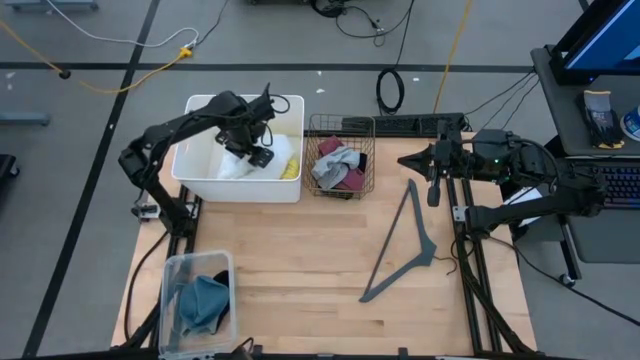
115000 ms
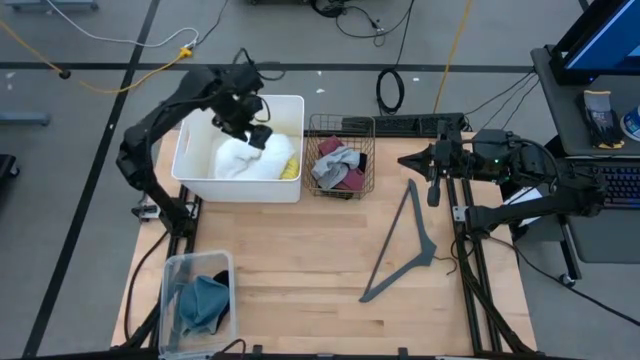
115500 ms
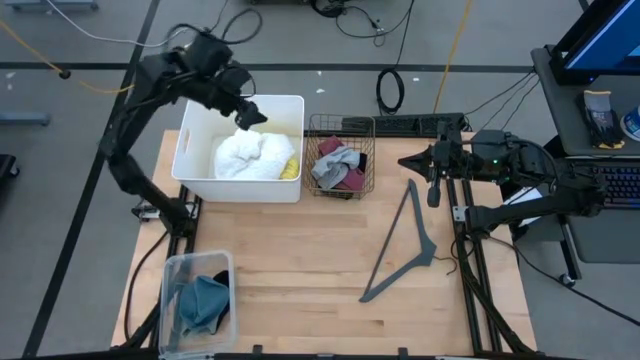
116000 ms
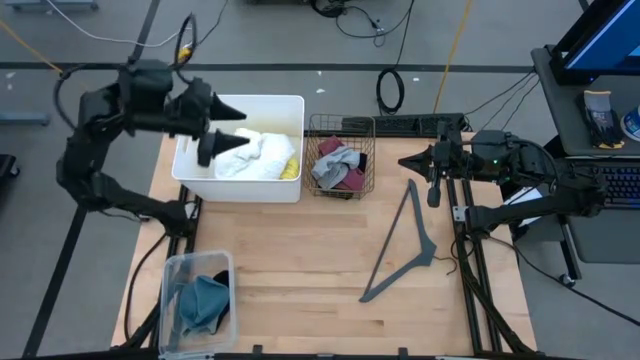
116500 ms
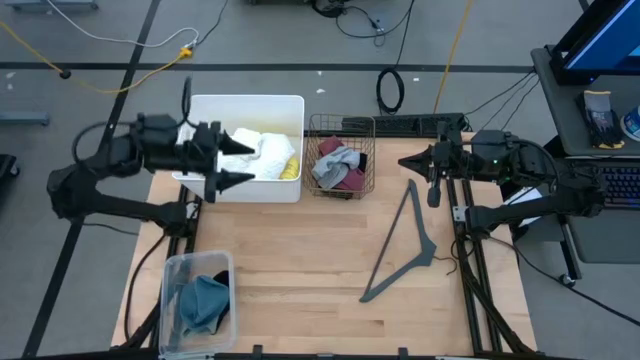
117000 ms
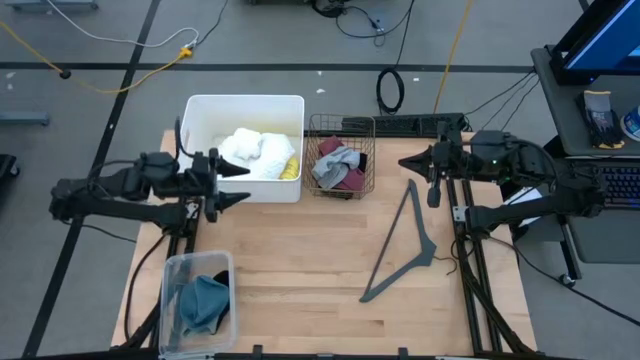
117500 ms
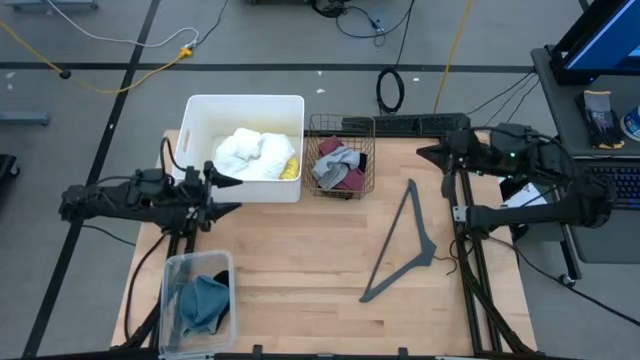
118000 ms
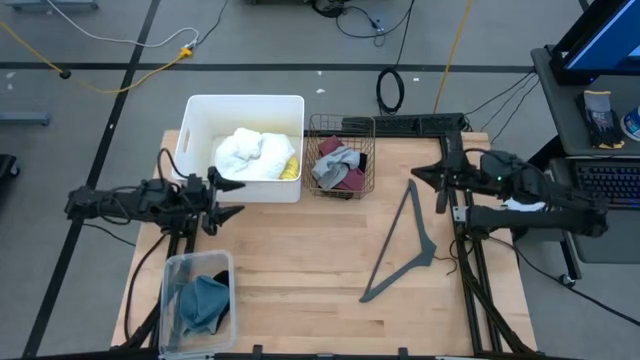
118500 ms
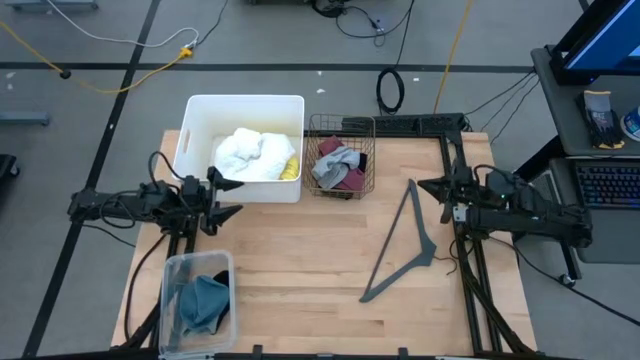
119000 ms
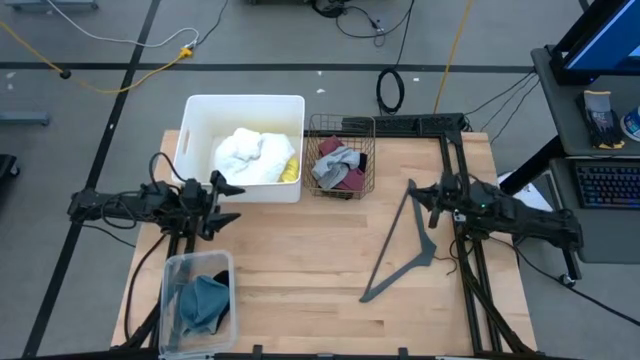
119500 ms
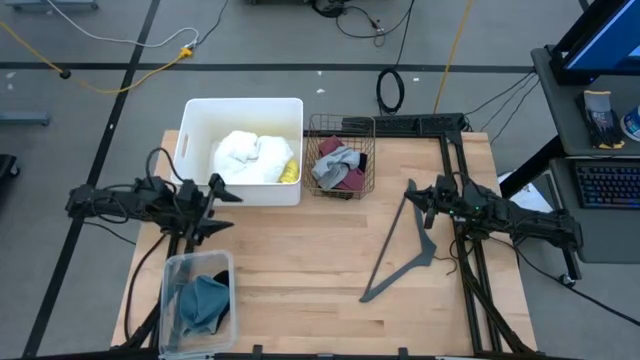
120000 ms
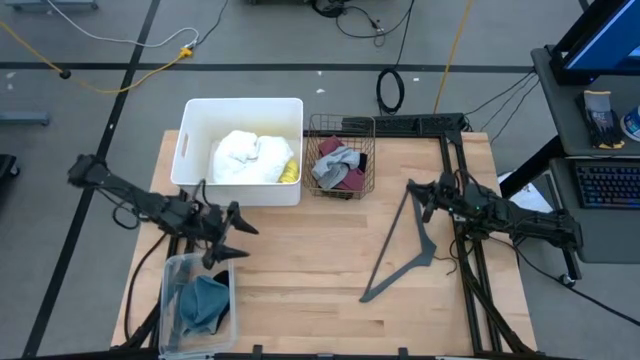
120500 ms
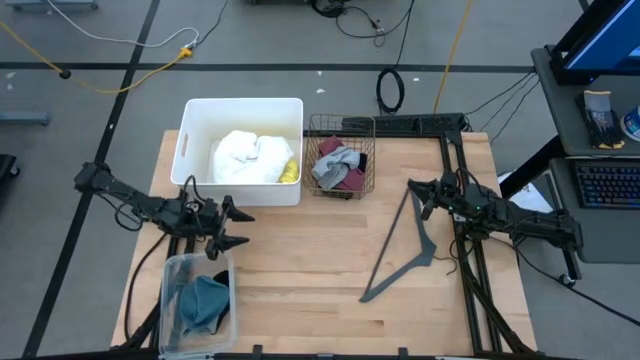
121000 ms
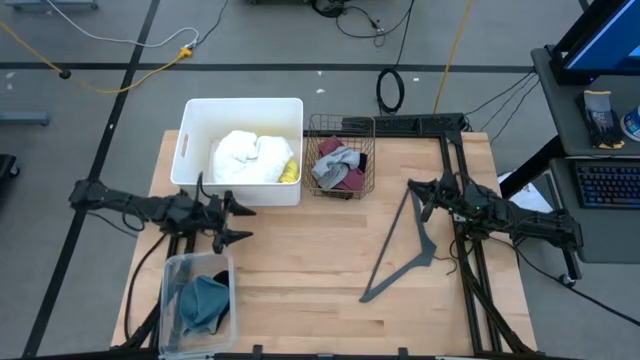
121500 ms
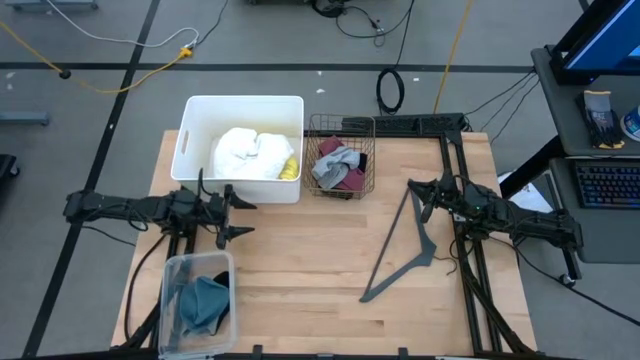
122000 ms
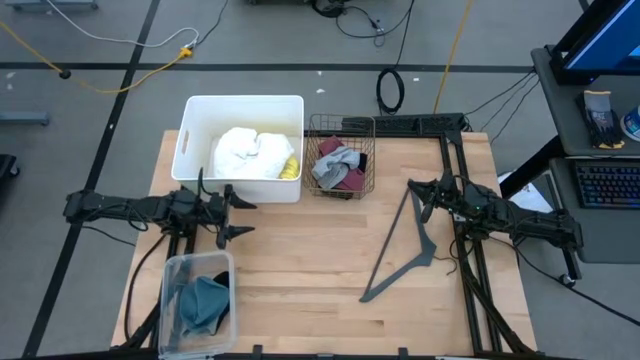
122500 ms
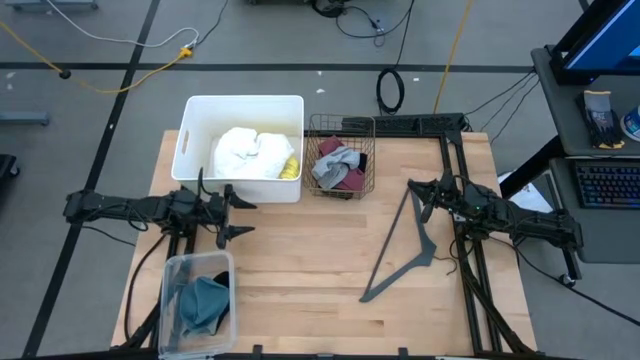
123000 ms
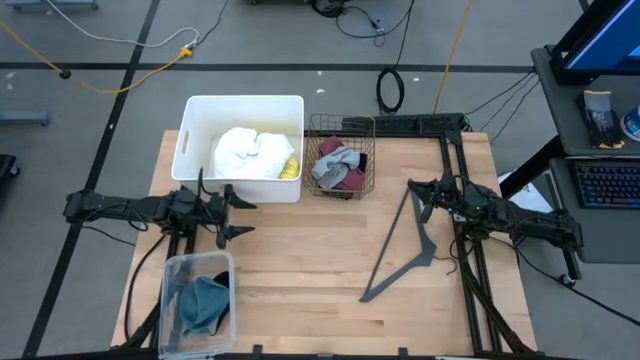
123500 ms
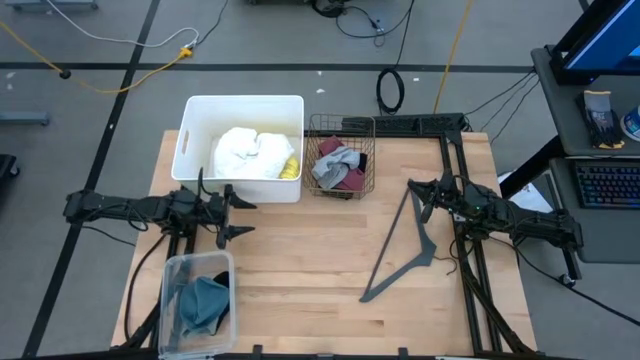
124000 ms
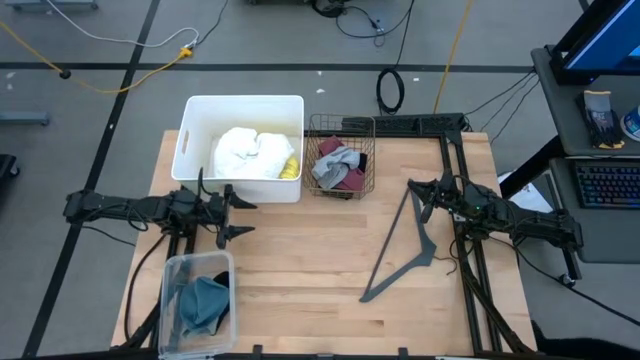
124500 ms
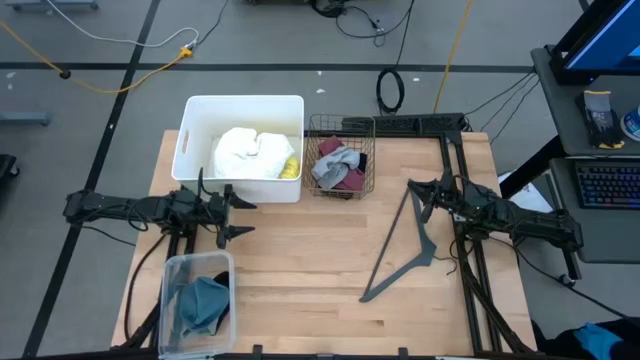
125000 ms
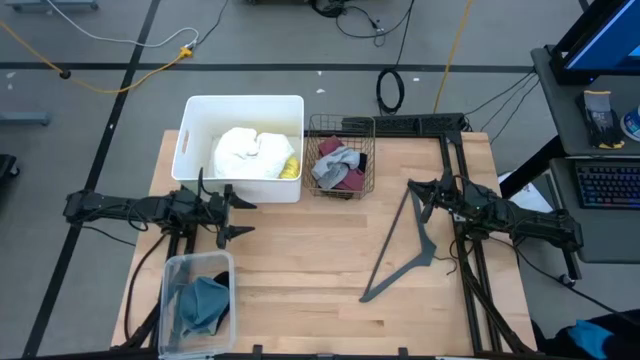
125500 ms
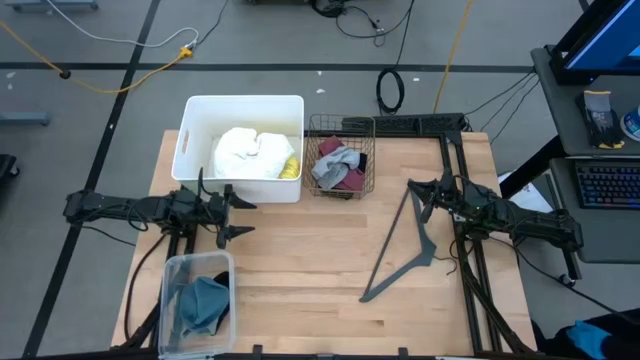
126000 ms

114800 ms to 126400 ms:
Task: Pick & Place Cloths
Return to Home Position

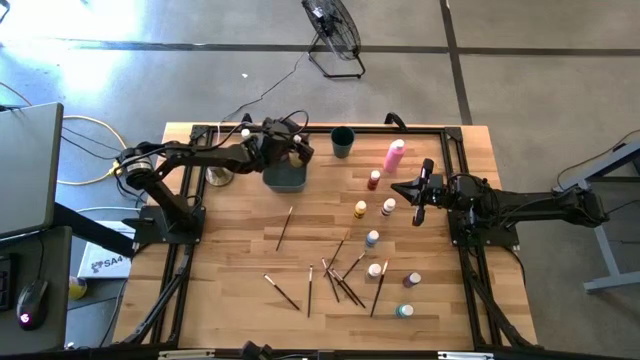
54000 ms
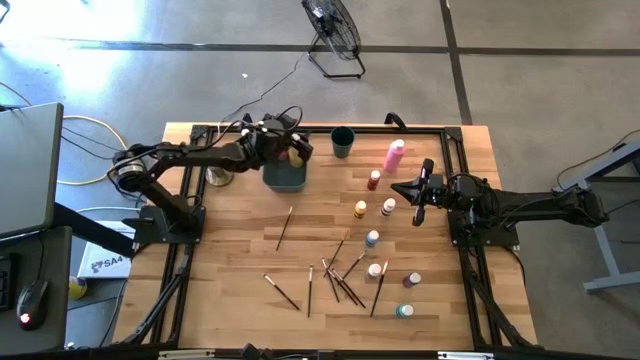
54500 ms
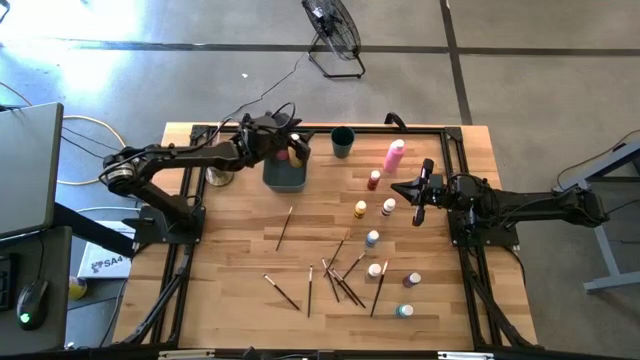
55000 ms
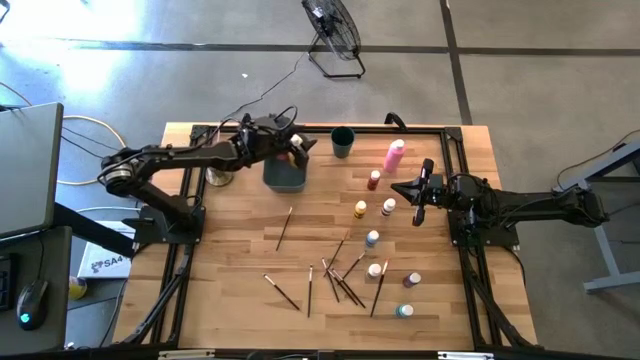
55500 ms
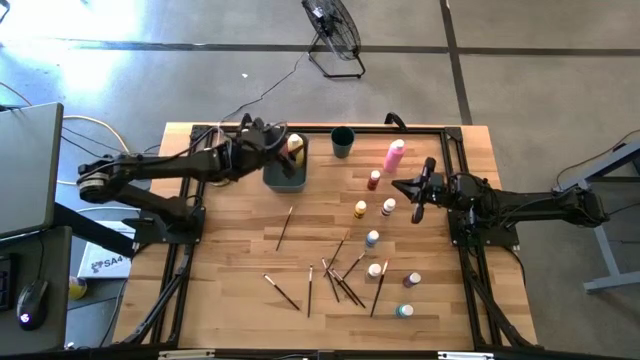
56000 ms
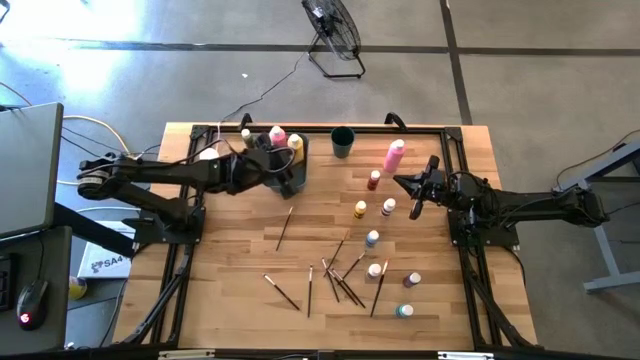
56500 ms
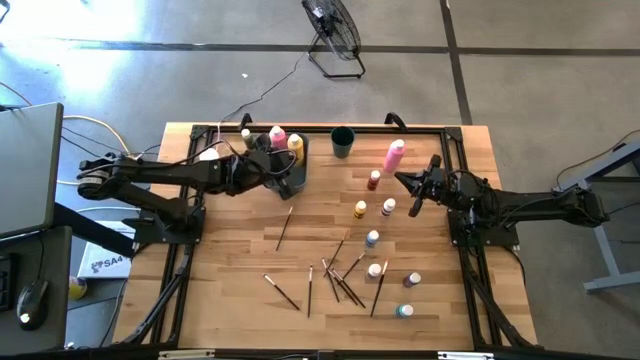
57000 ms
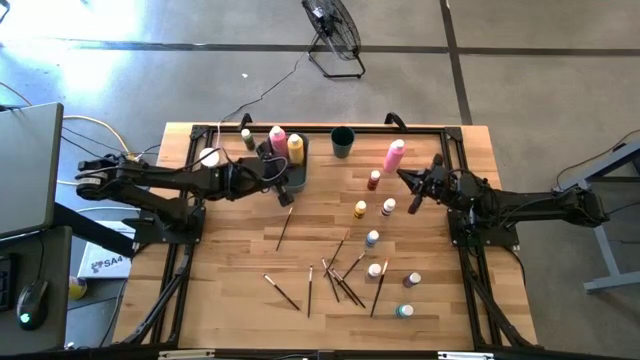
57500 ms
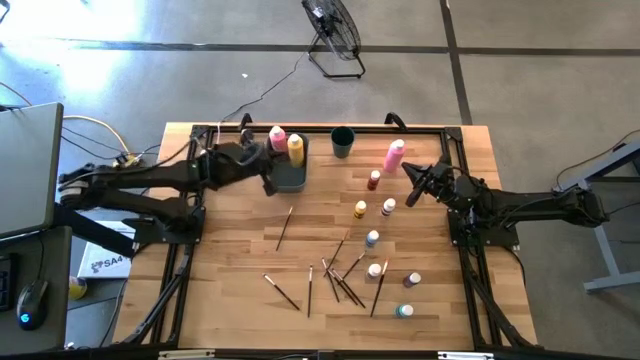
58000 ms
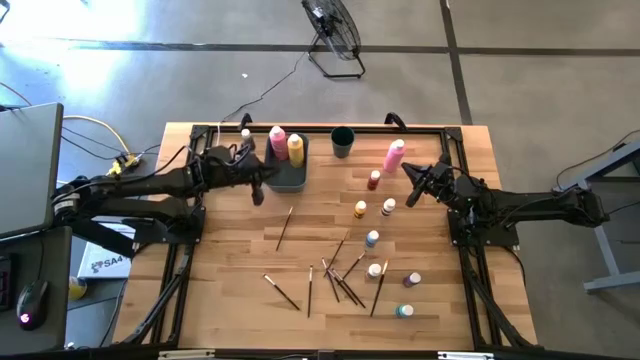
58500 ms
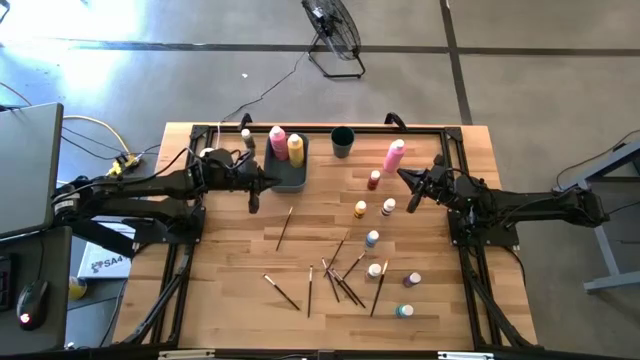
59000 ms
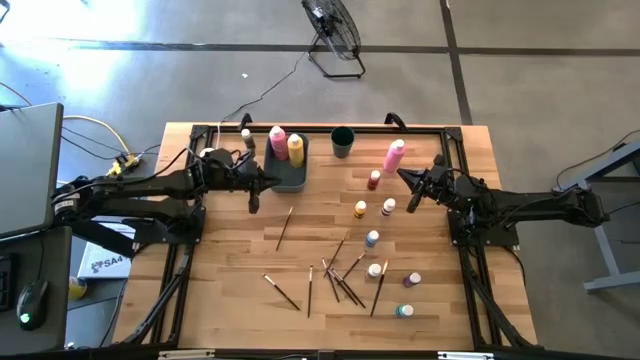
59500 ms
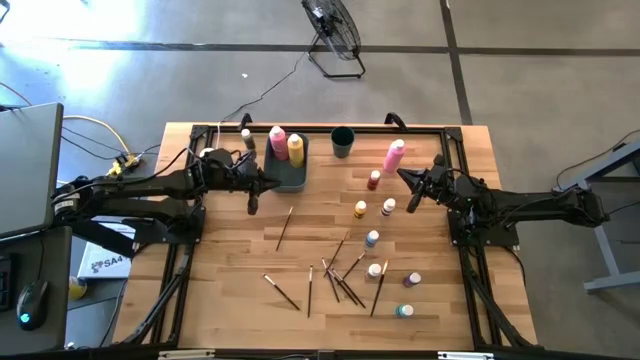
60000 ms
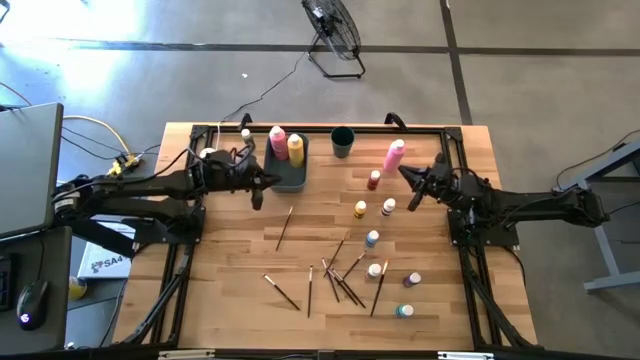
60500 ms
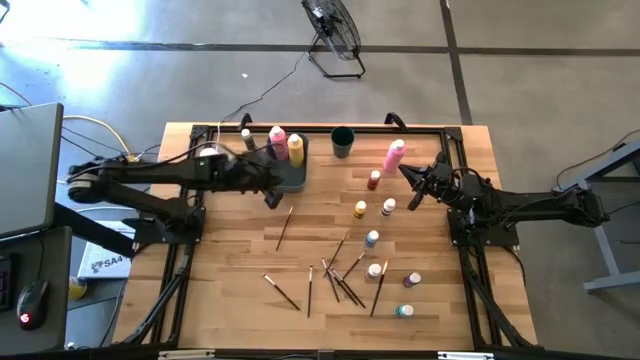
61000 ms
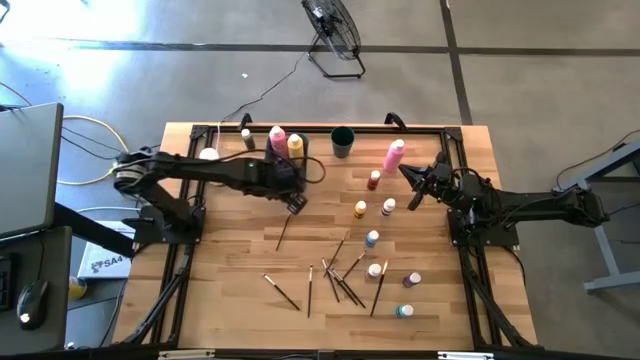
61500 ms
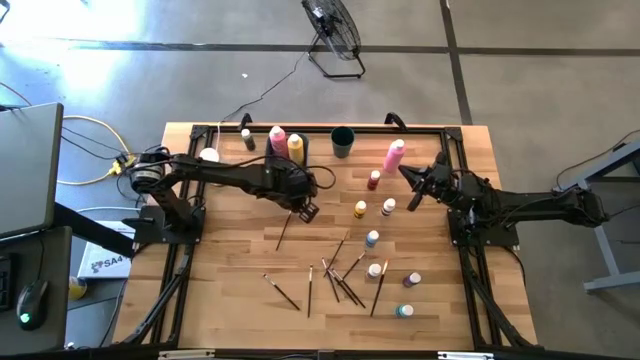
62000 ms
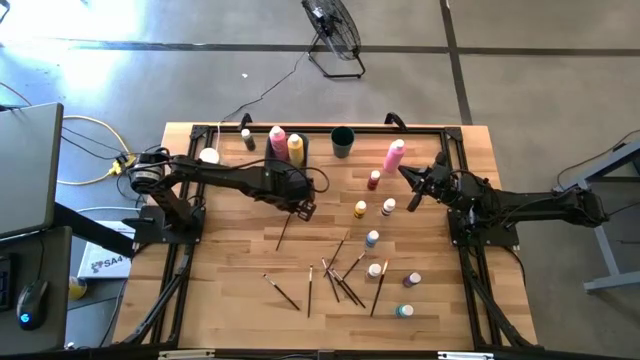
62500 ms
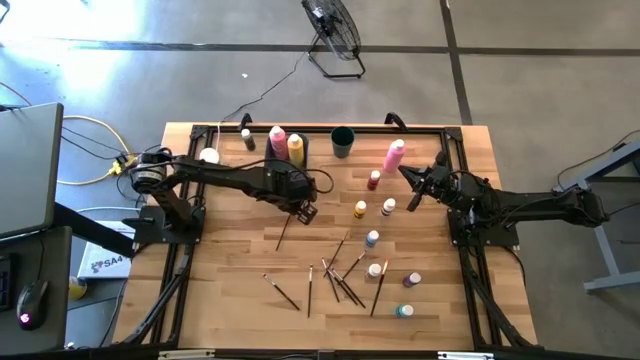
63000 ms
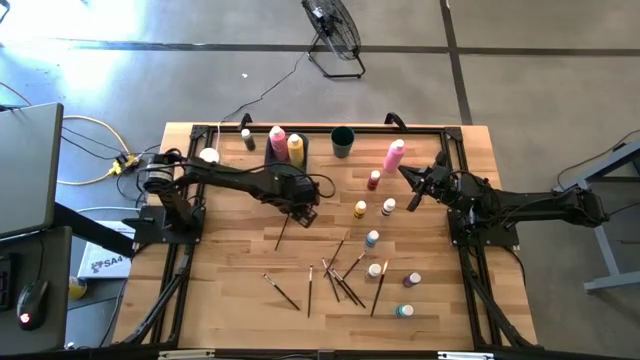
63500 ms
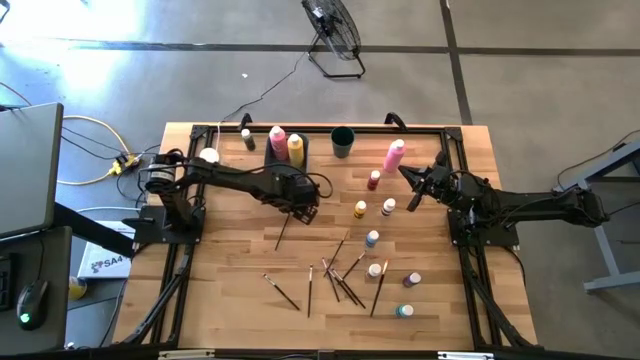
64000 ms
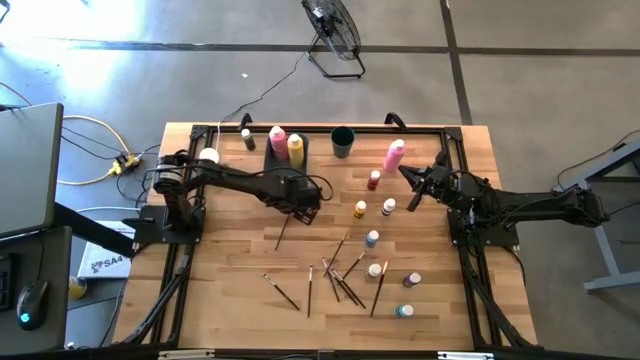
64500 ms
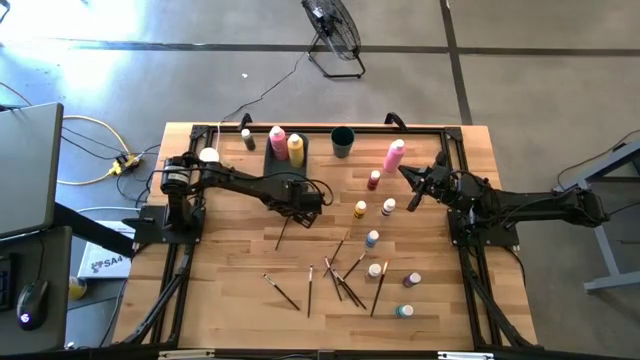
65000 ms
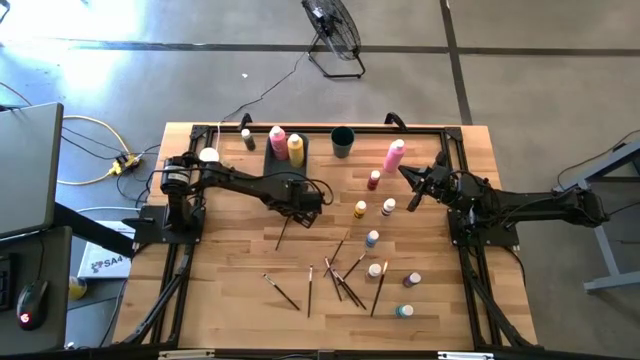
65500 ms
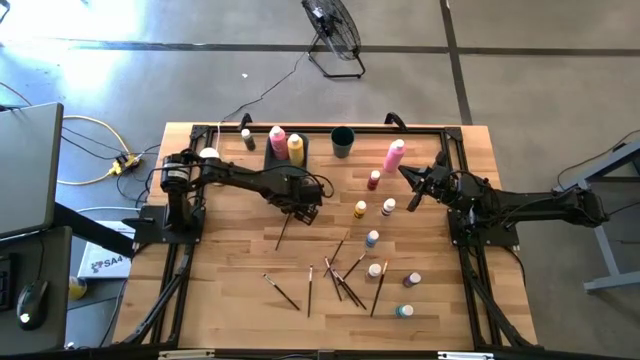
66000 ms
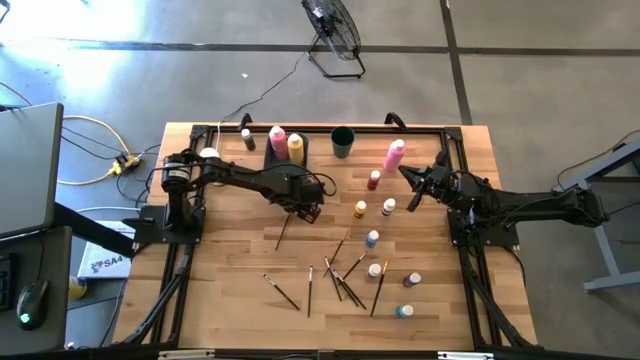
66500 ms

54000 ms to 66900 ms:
Task: Pick & Place Paint Supplies
Put the gold paint brush into the green cup
